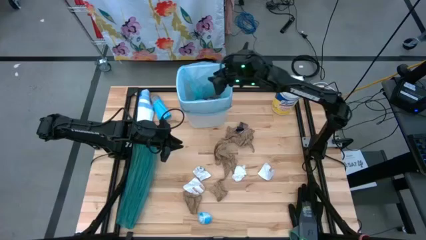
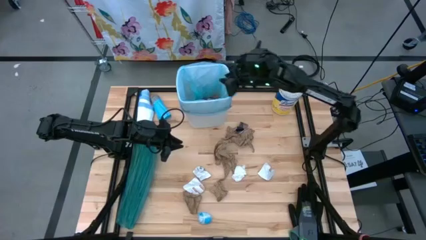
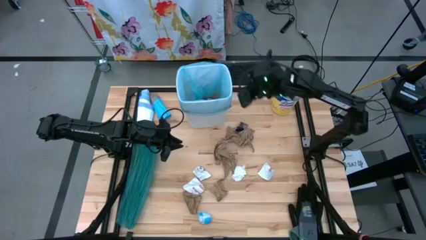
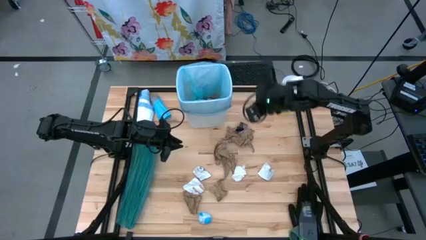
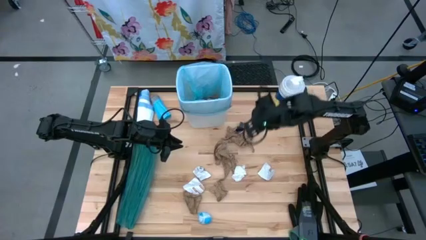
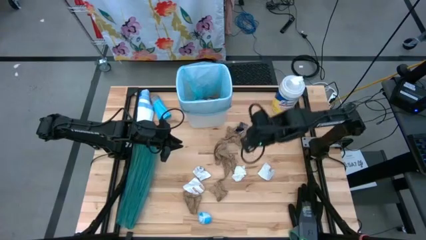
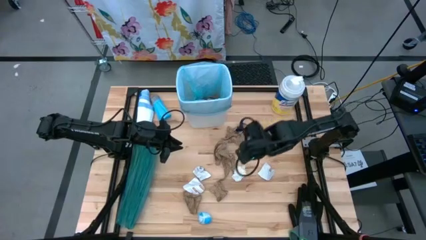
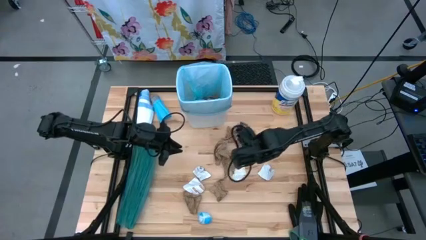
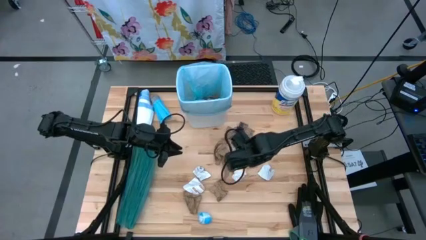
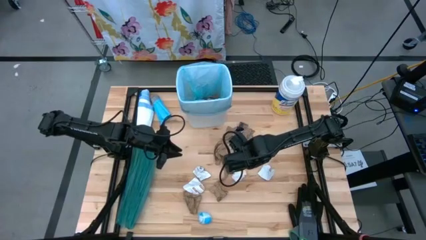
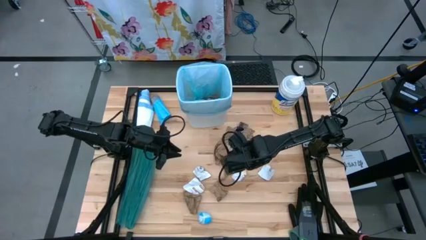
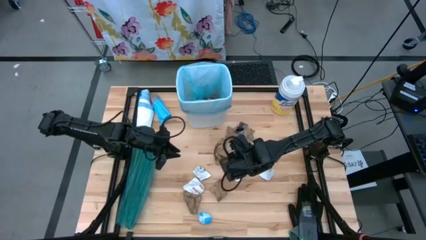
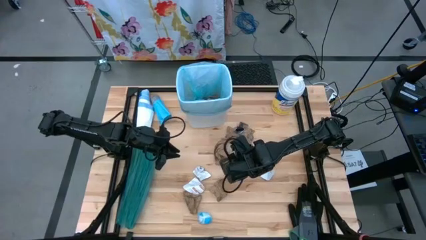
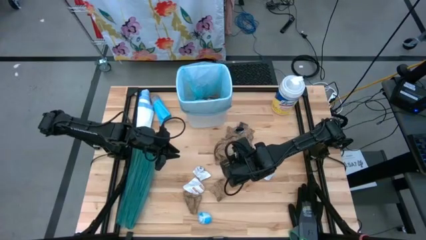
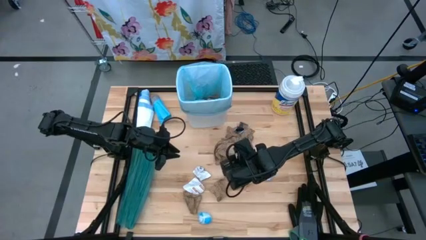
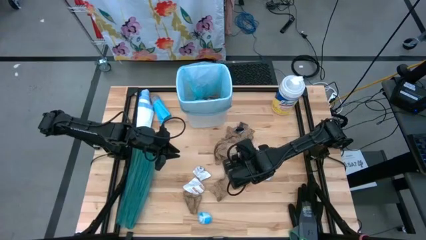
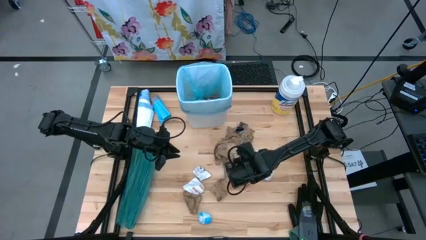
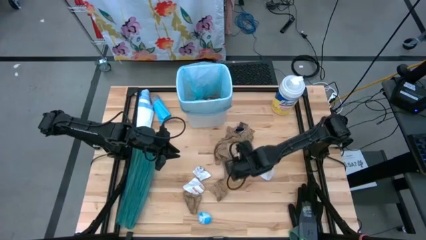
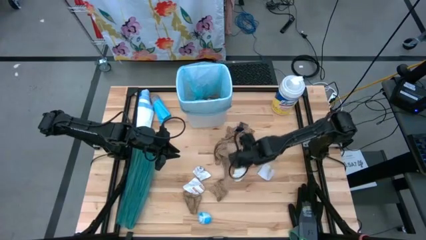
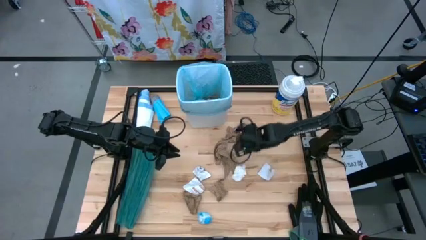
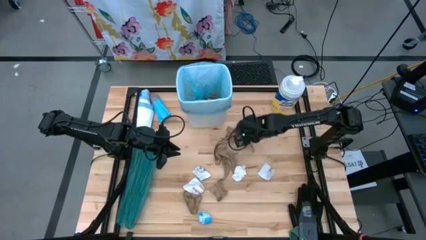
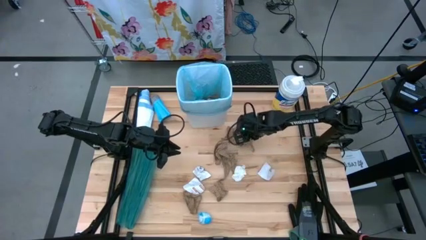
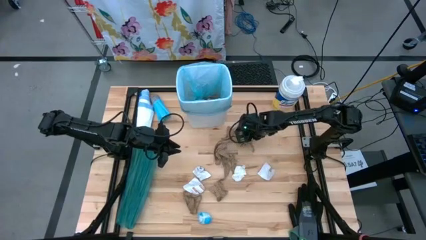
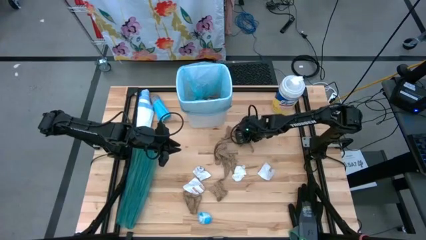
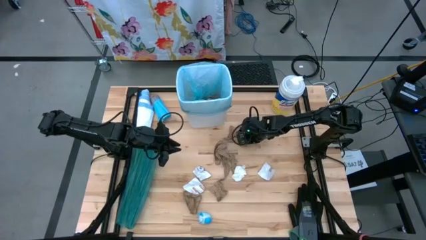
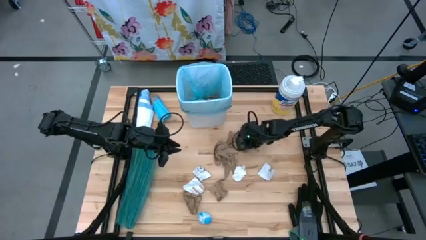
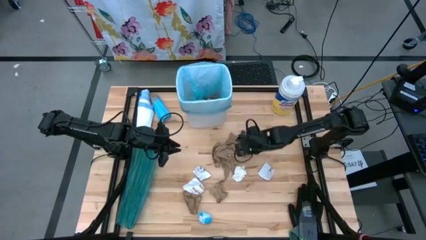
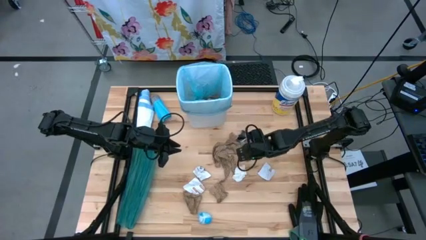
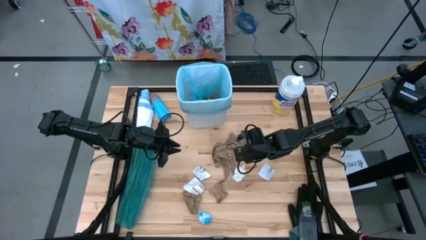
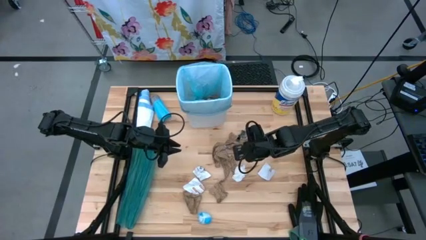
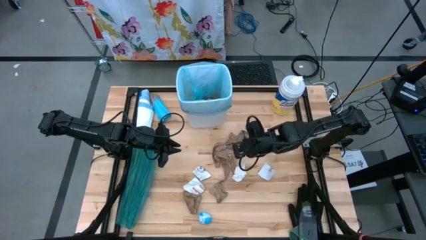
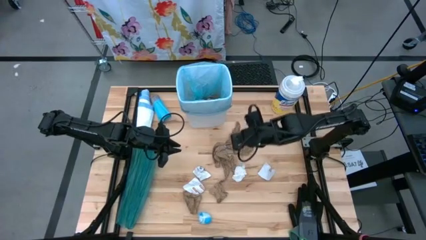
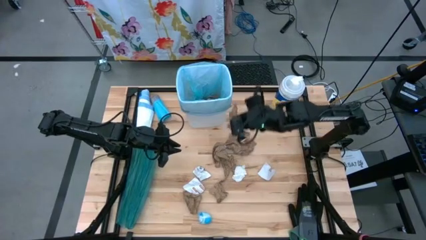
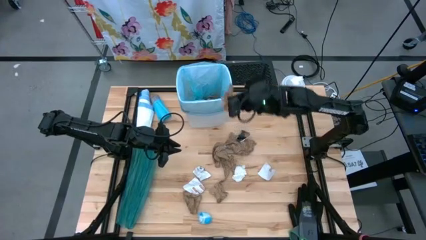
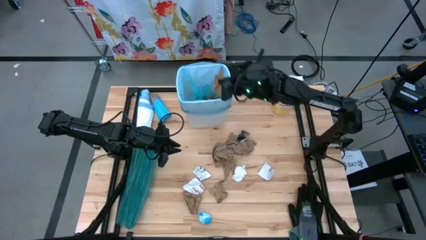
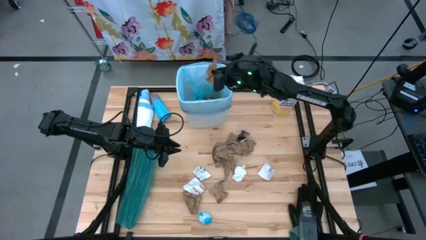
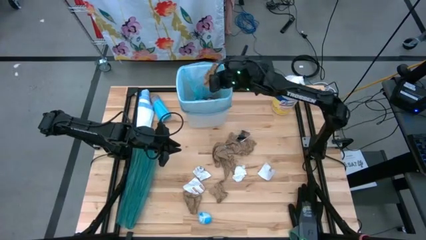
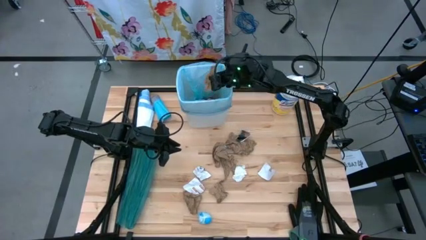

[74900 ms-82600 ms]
Task: place trash/remove bag and relplace
Put the brown napkin into the white trash bin

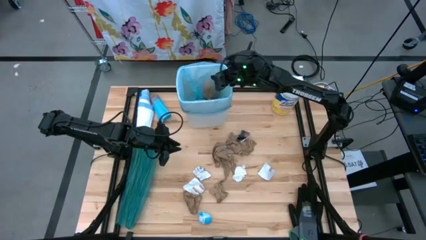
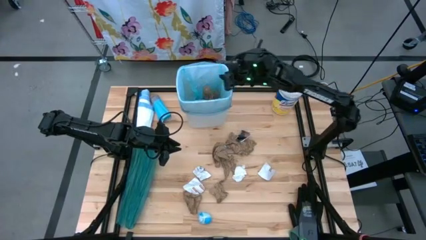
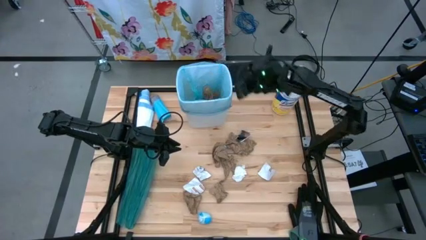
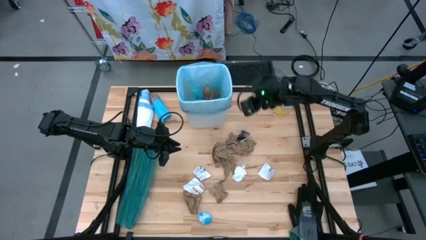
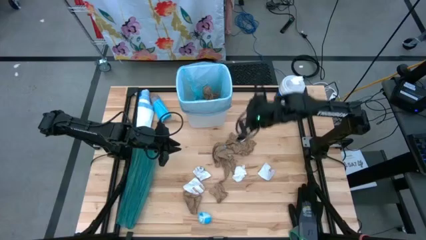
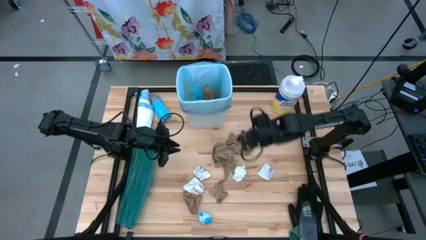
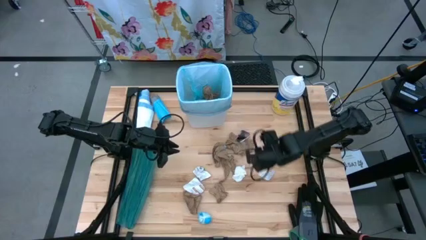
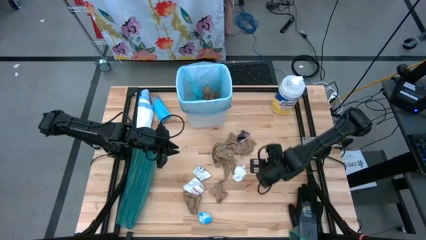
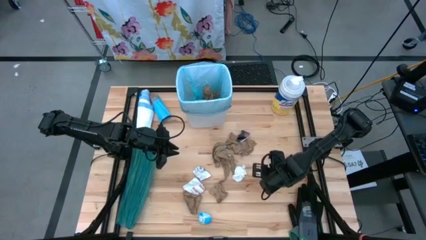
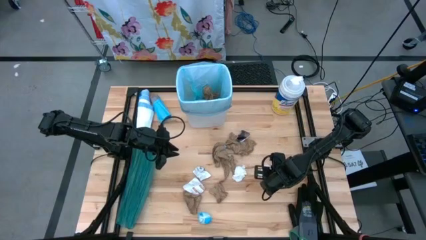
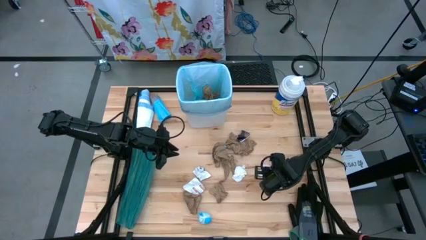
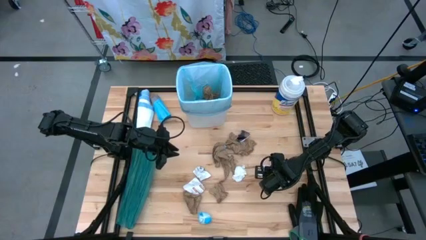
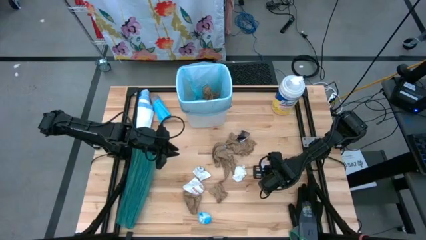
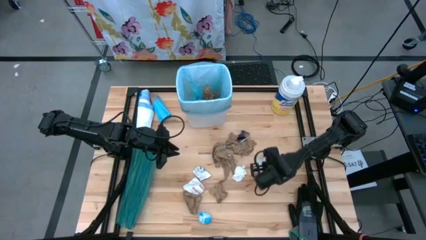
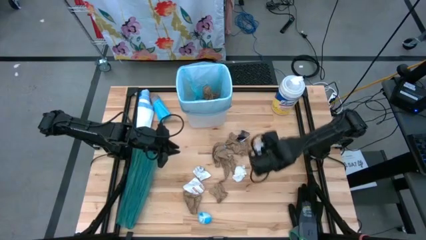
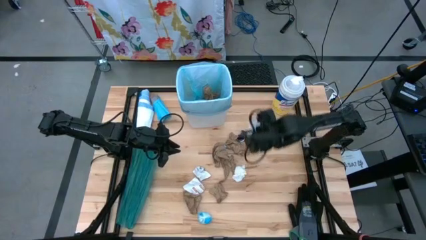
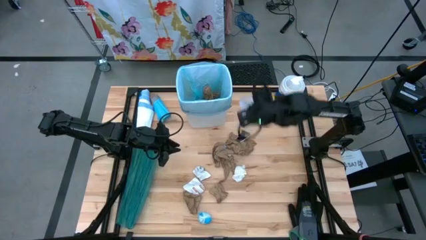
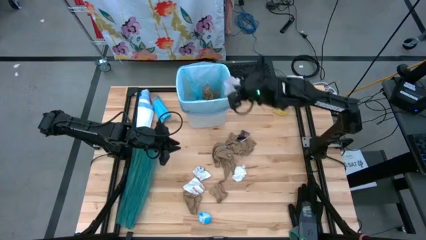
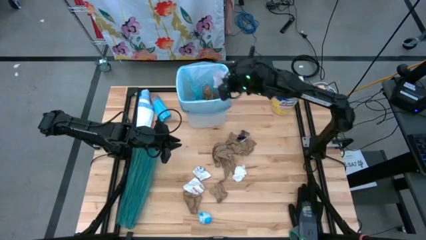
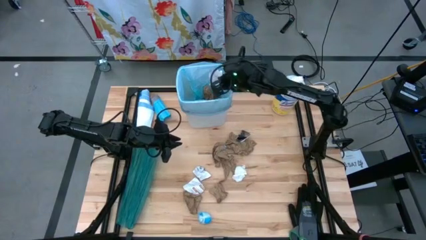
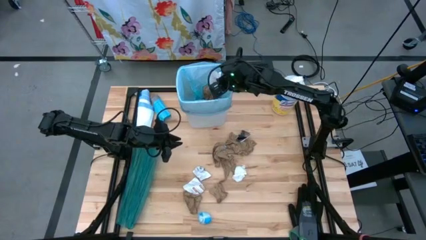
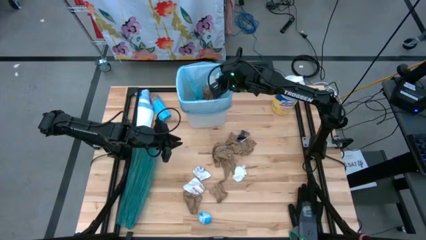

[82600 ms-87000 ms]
Put the white paper into the white trash bin

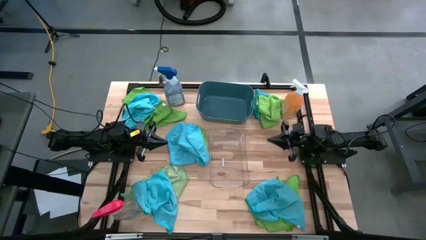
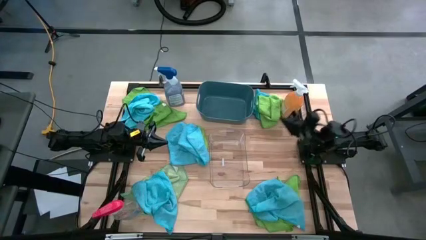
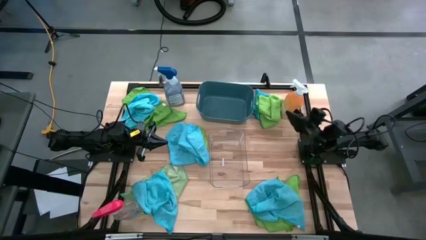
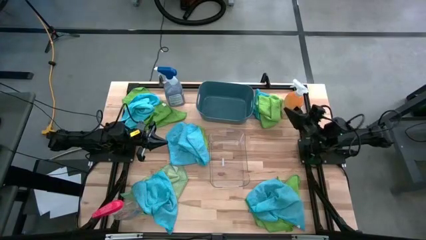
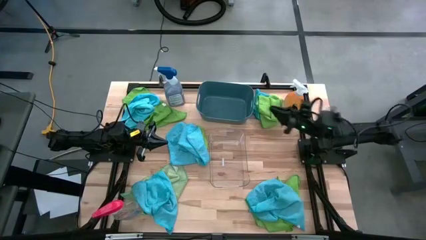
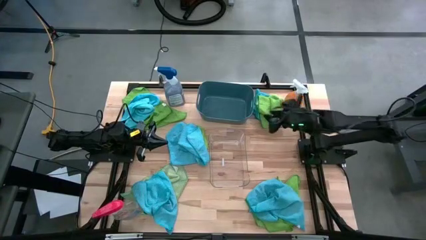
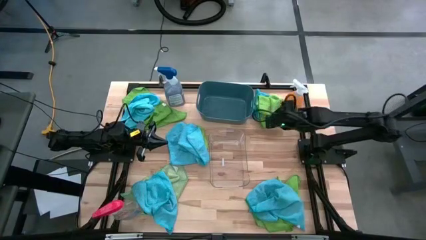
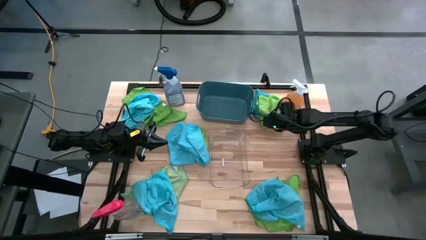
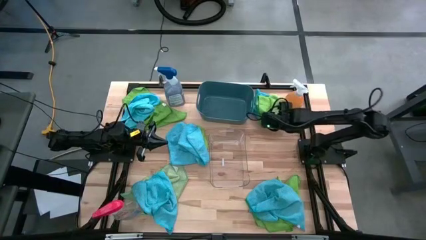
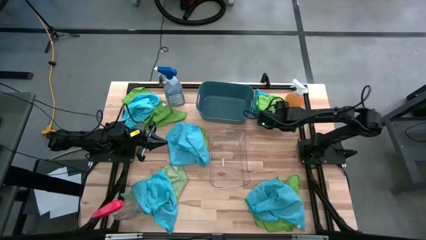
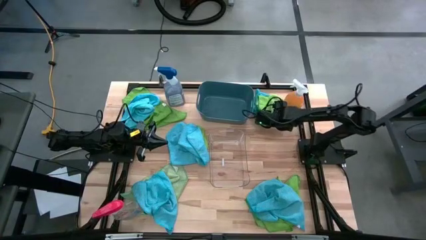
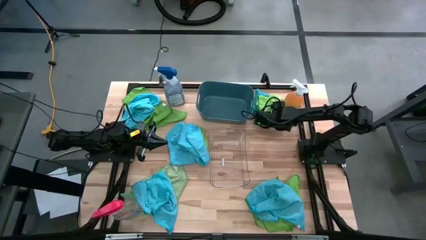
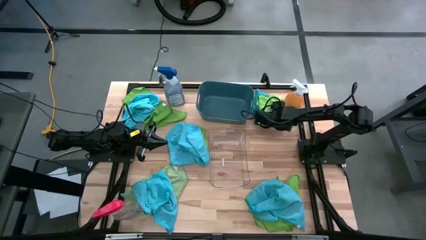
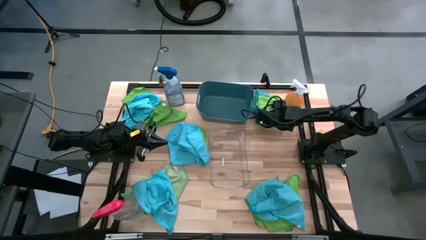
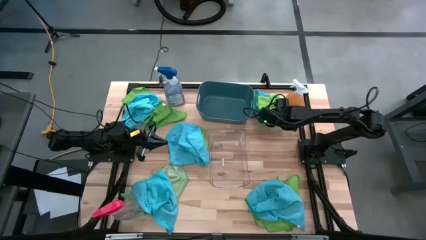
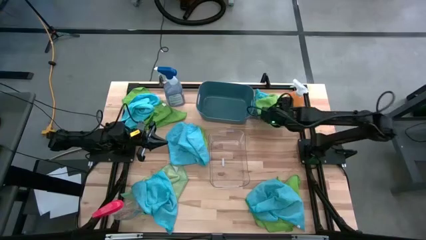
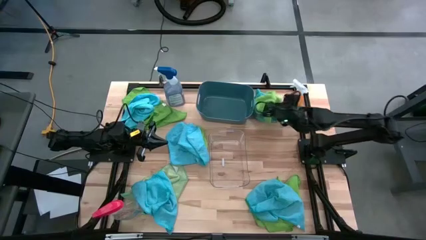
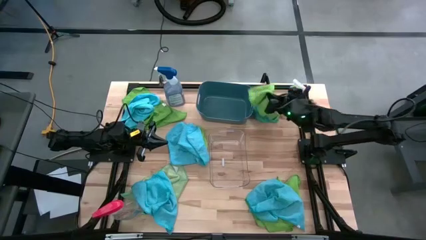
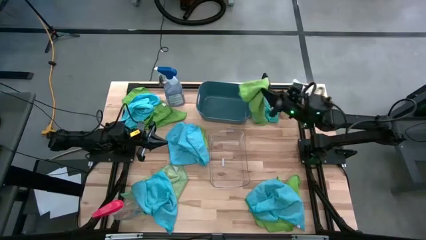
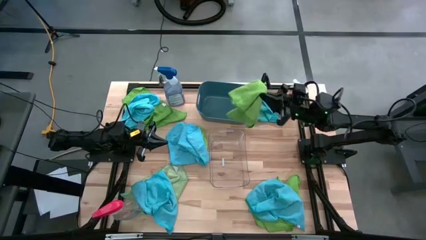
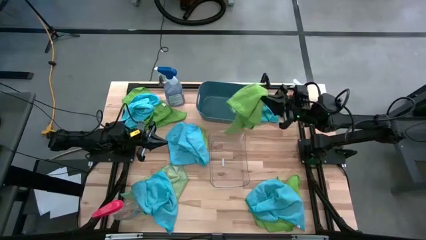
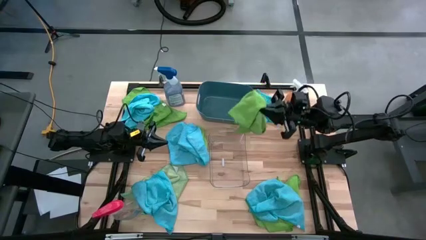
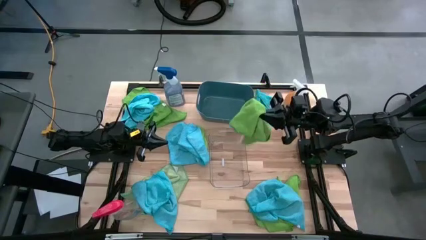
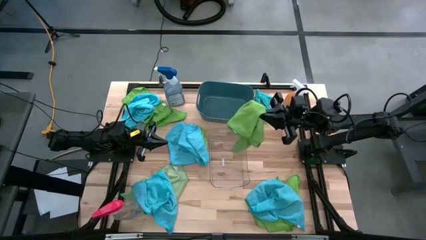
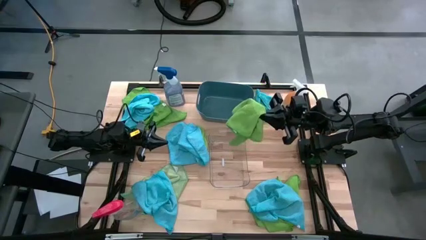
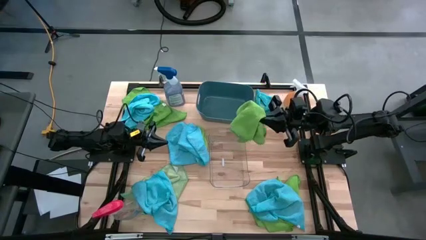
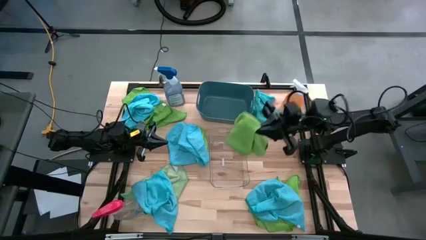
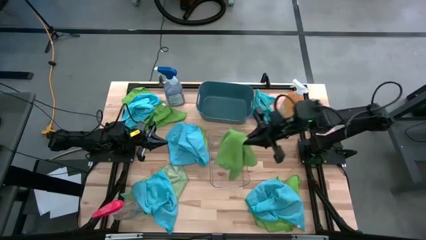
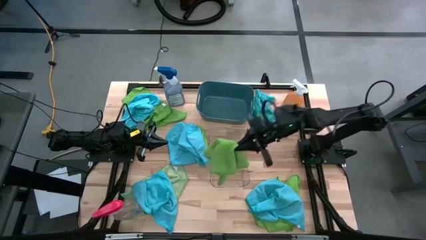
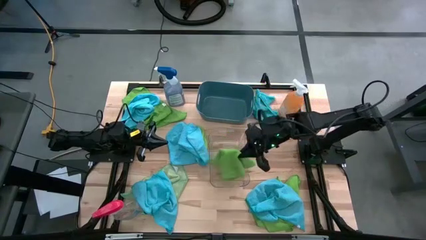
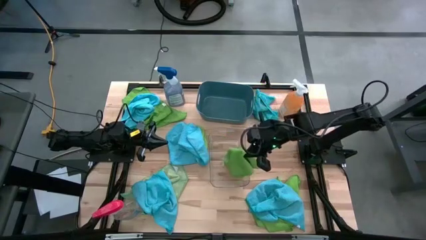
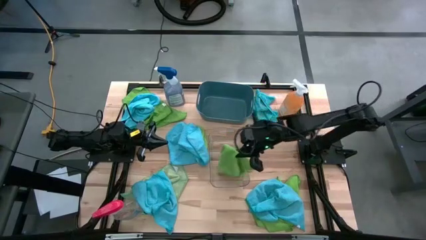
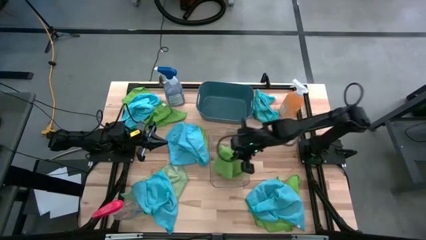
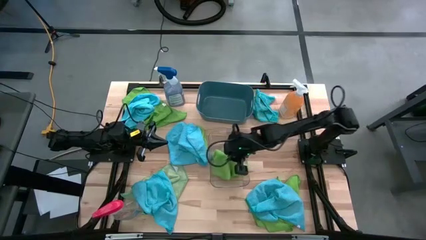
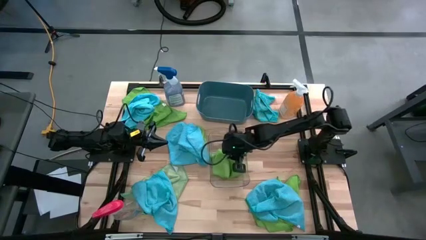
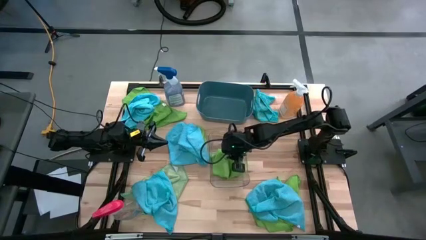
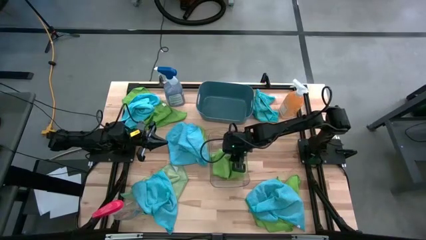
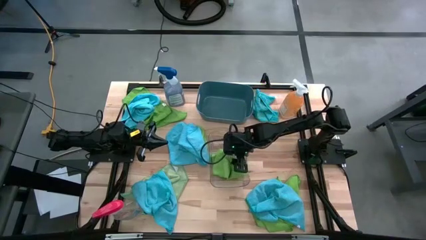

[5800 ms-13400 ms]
Task: Sort microfiber towel by color & place in baskets
Put the green microfiber towel into the transparent bin
